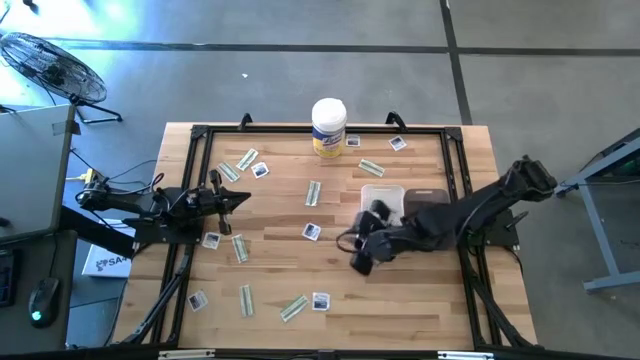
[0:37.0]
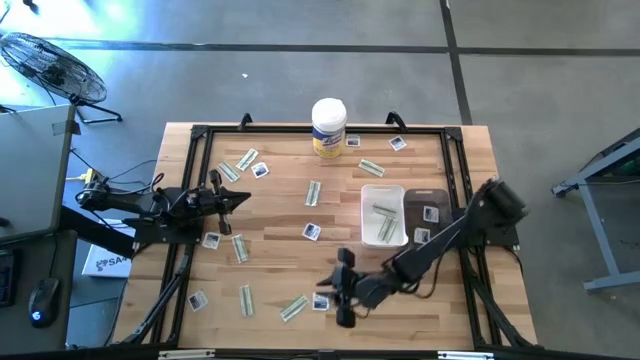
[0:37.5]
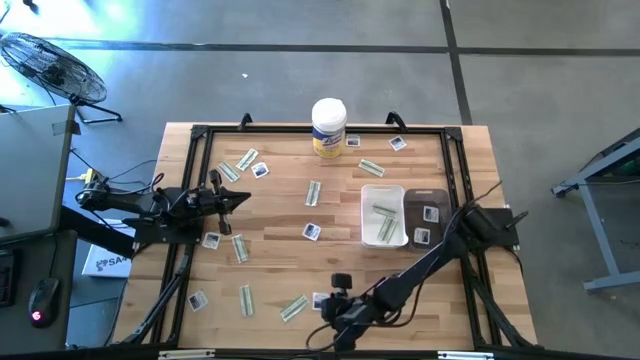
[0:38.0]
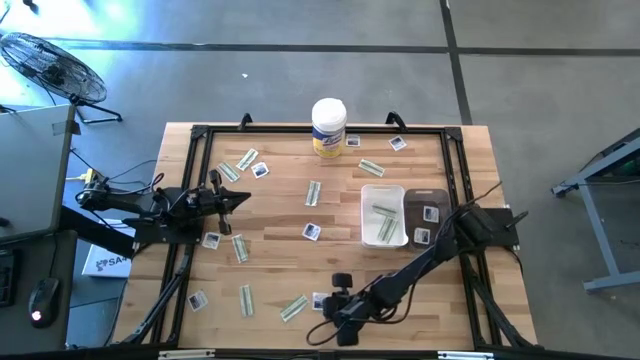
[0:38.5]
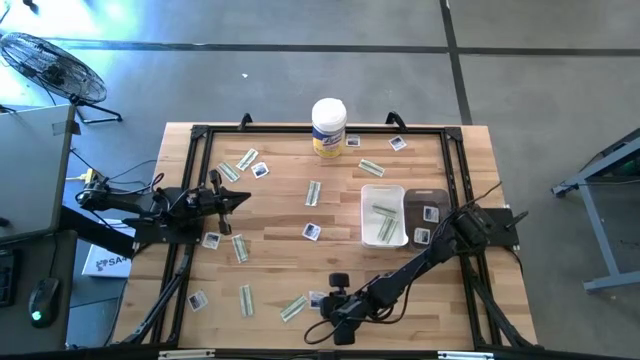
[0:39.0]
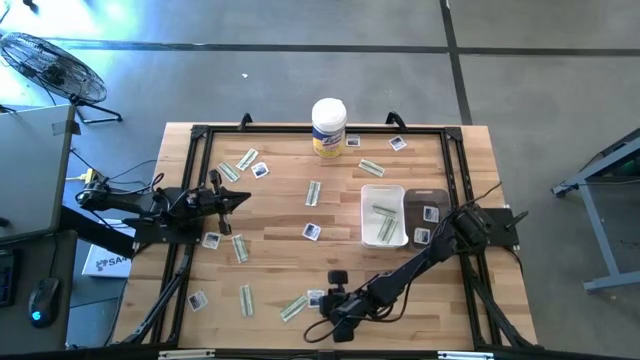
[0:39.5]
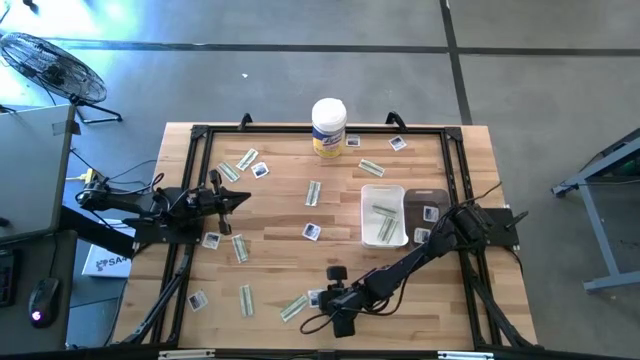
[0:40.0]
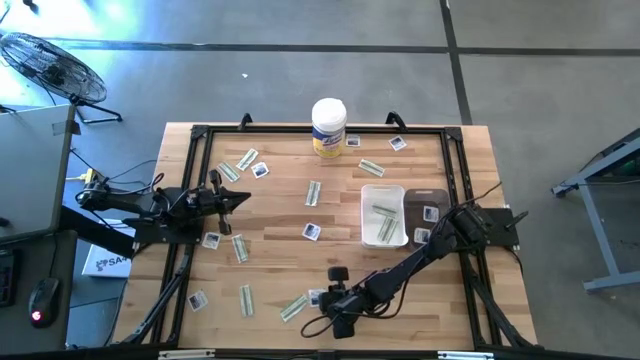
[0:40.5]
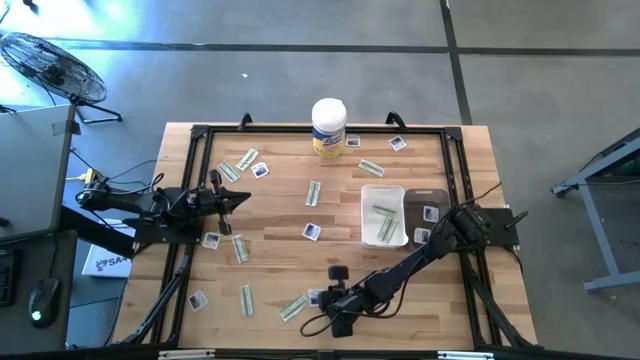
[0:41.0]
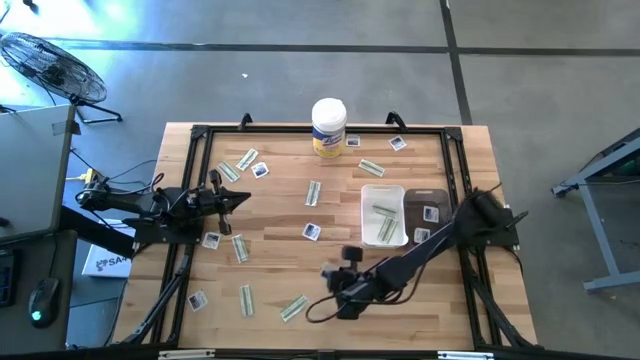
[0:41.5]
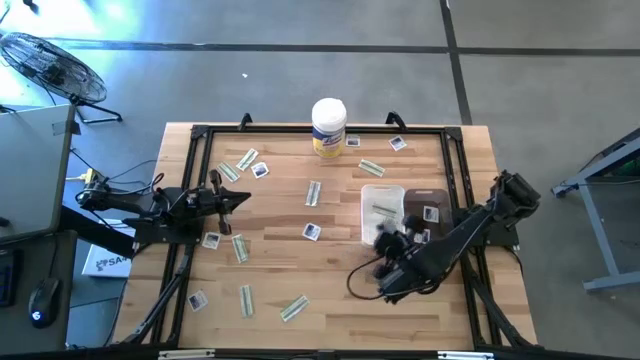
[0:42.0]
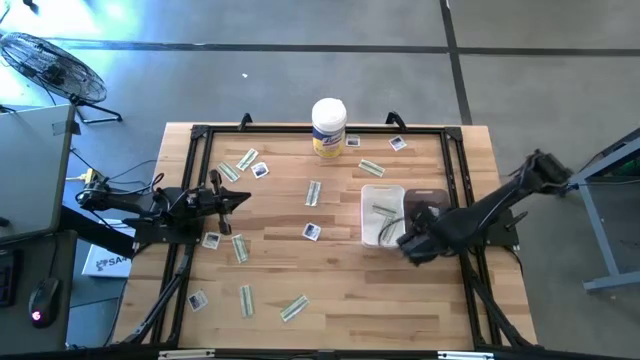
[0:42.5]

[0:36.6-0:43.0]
Task: Pick & Place First Aid Supplies
Put the blue alcohol pad into the black bin

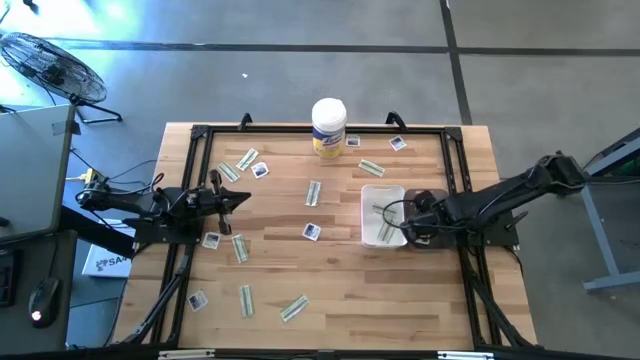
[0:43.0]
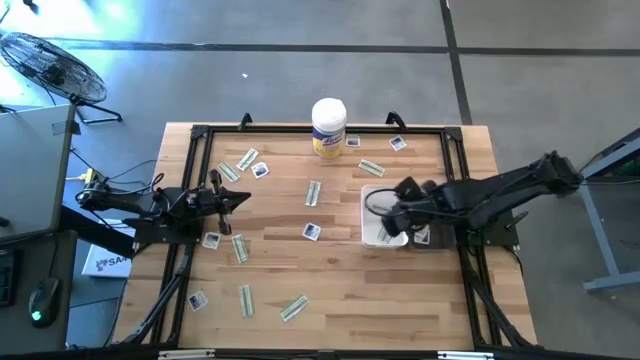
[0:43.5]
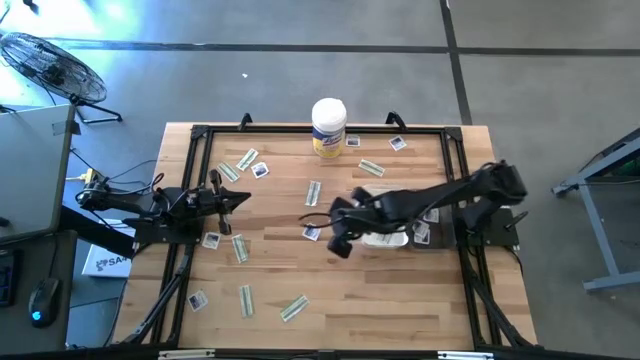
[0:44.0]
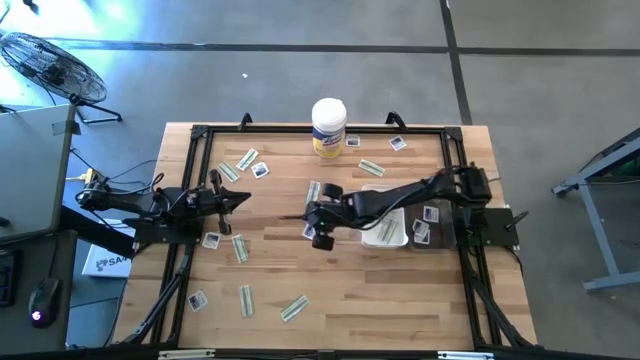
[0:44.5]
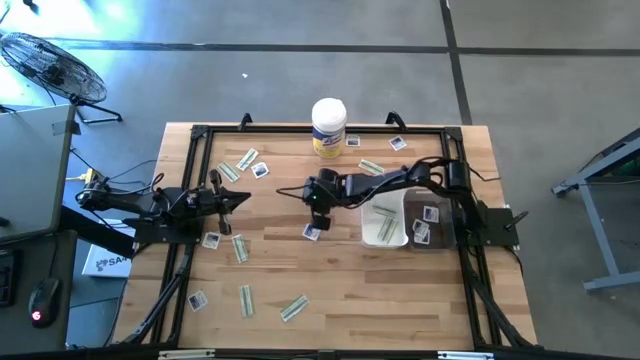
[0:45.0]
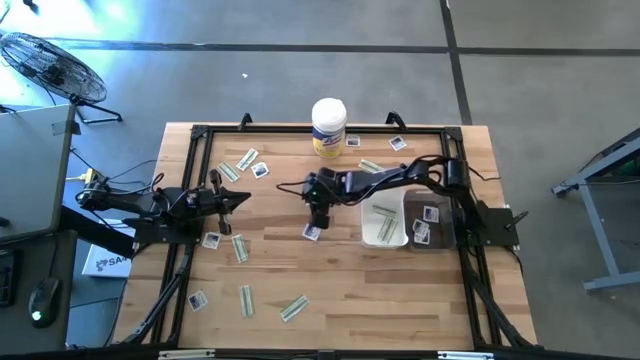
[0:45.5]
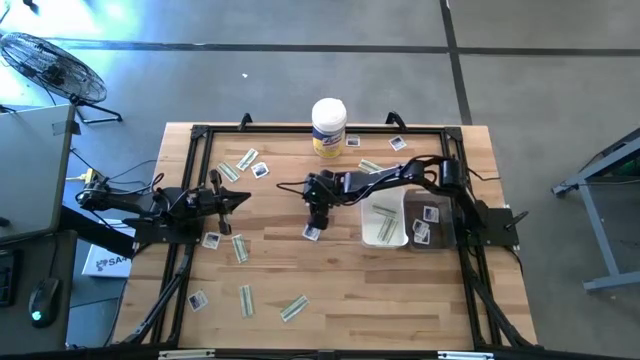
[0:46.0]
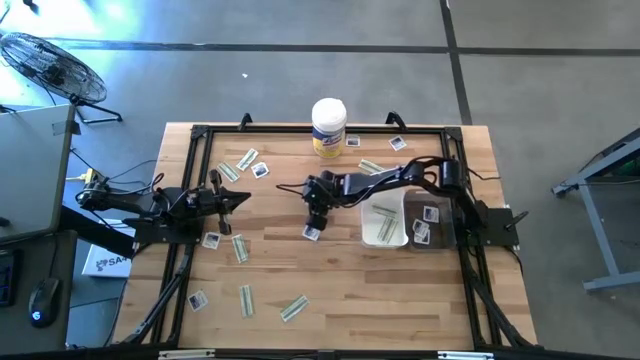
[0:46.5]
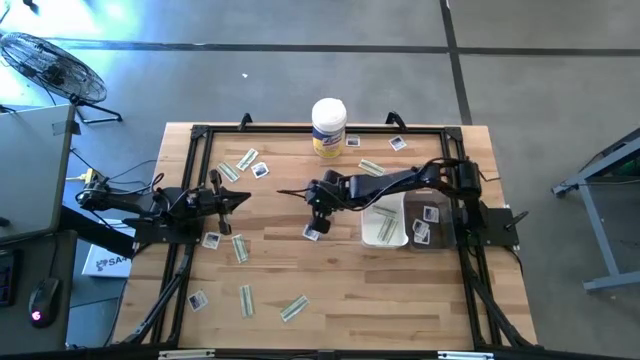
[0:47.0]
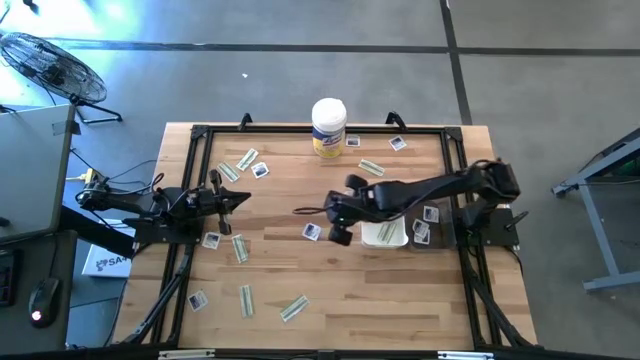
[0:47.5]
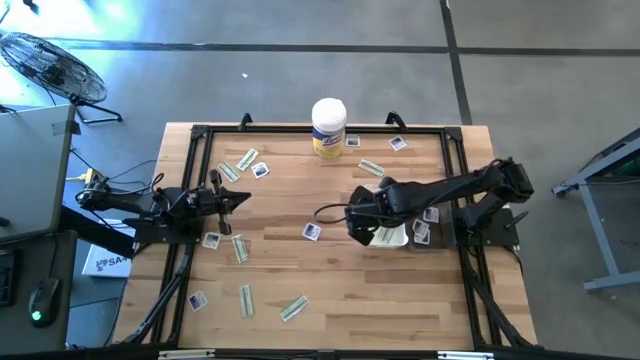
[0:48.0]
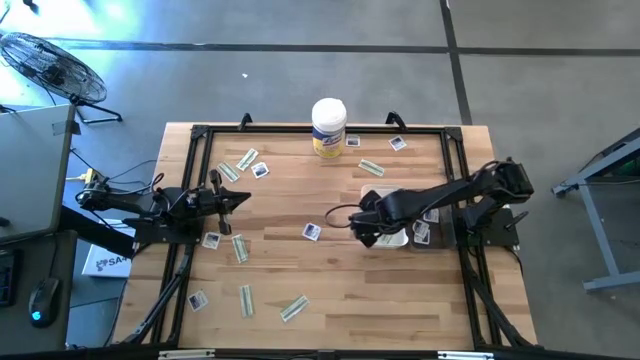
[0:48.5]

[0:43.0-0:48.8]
Put the green bandage pack into the white bin

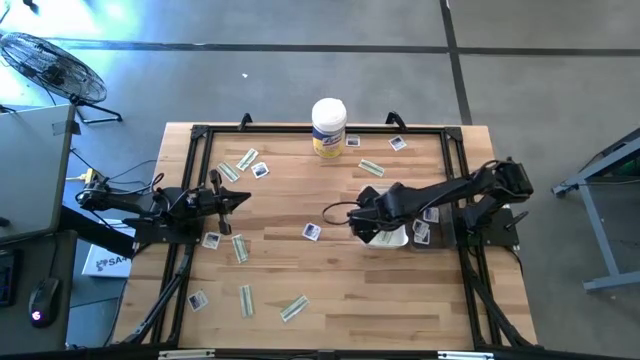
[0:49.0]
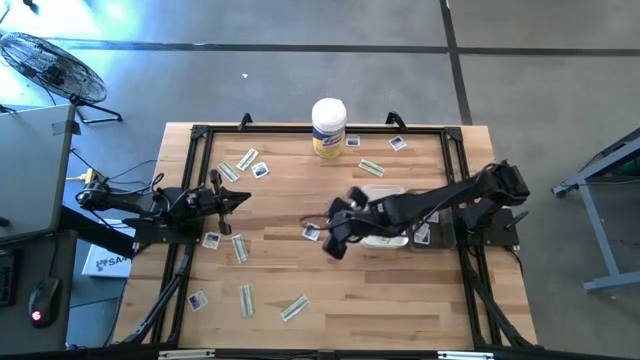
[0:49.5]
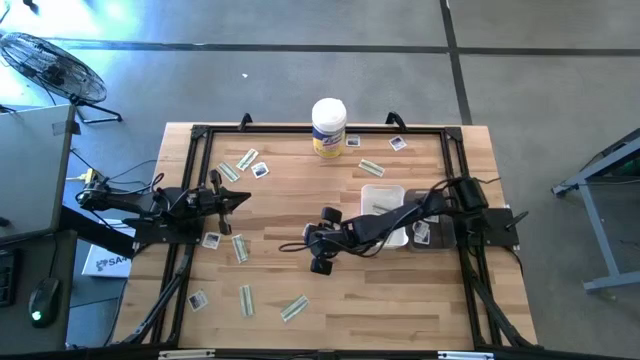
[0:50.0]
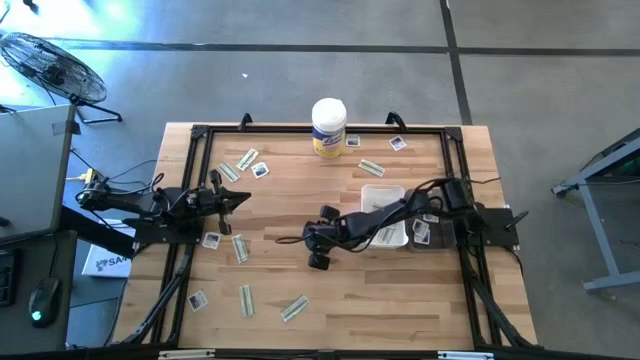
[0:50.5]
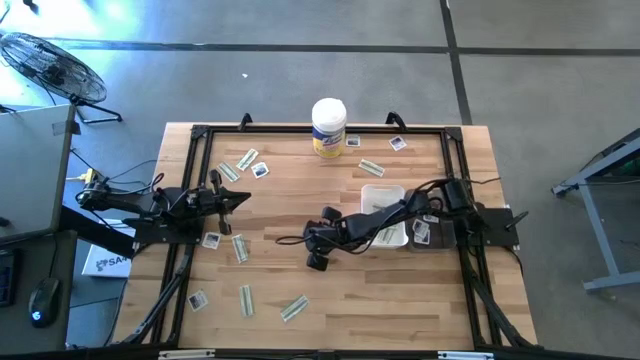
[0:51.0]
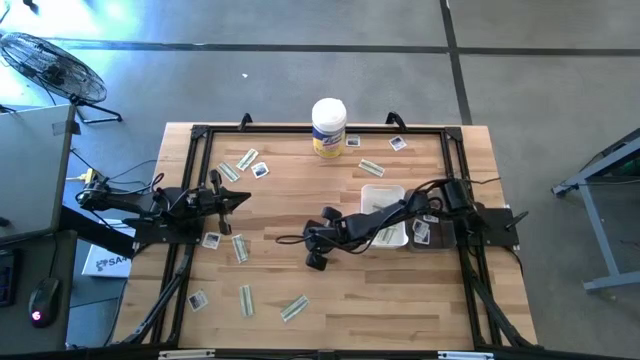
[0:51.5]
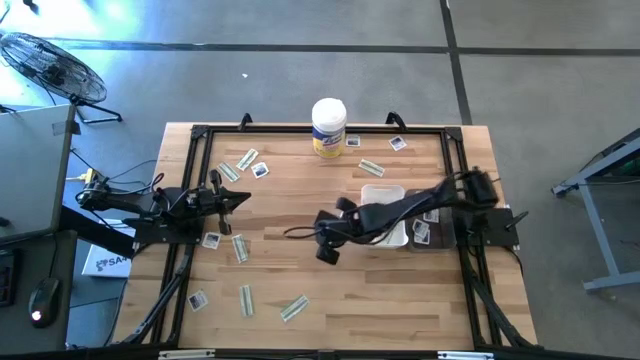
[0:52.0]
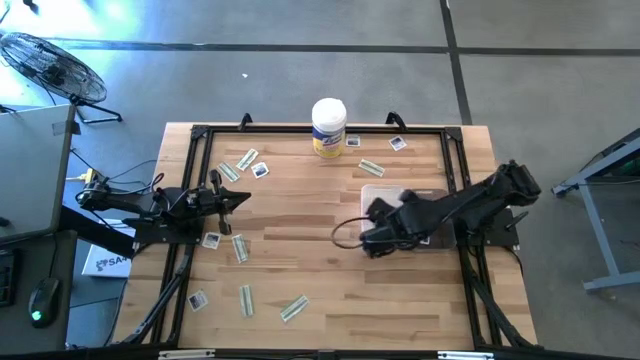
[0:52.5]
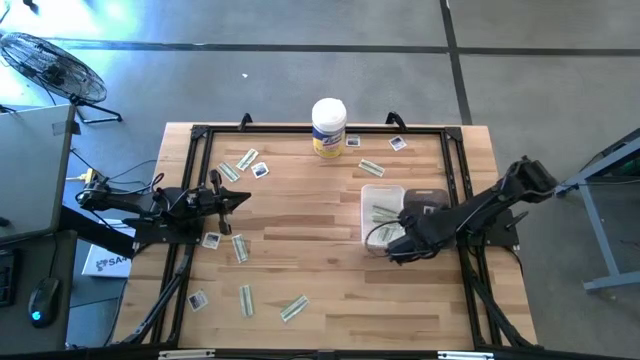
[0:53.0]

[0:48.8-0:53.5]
Put the blue alcohol pad into the black bin

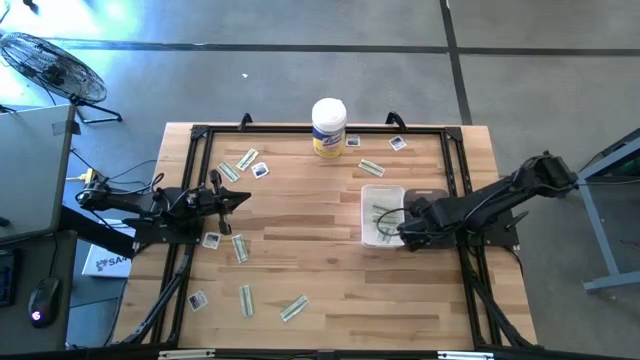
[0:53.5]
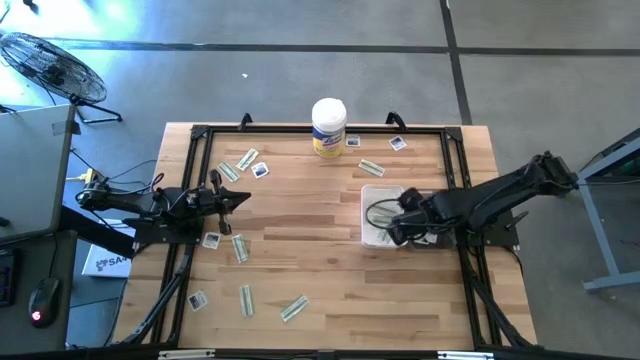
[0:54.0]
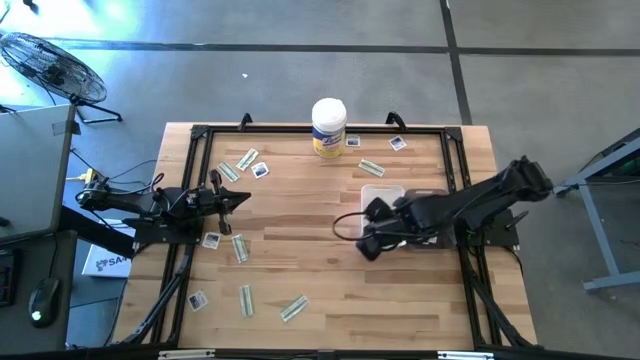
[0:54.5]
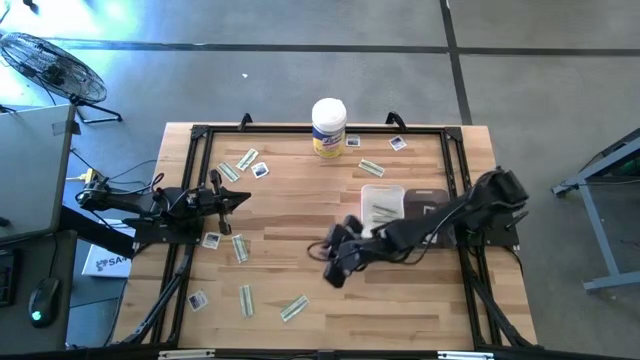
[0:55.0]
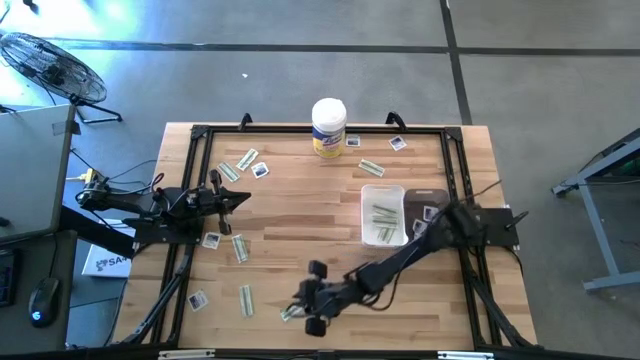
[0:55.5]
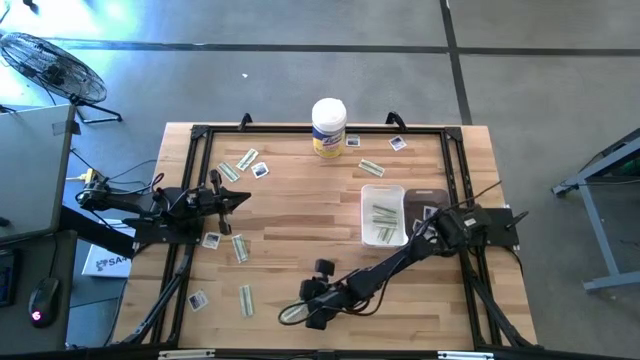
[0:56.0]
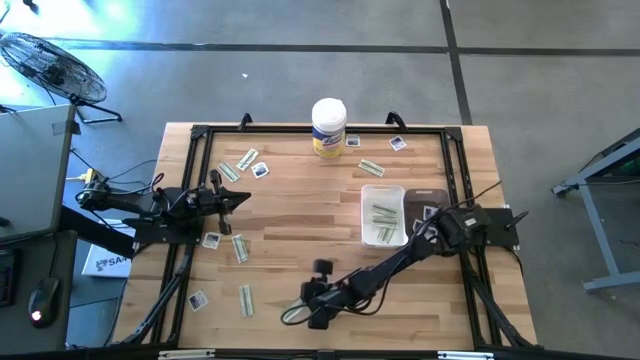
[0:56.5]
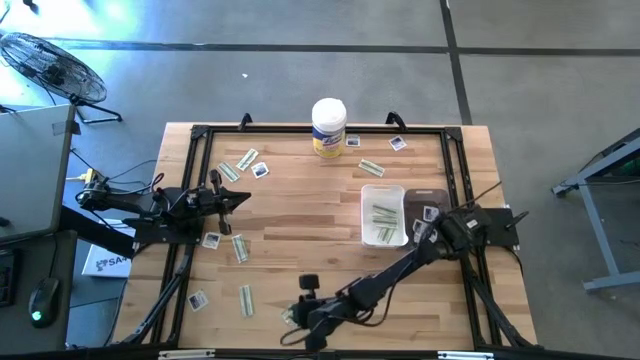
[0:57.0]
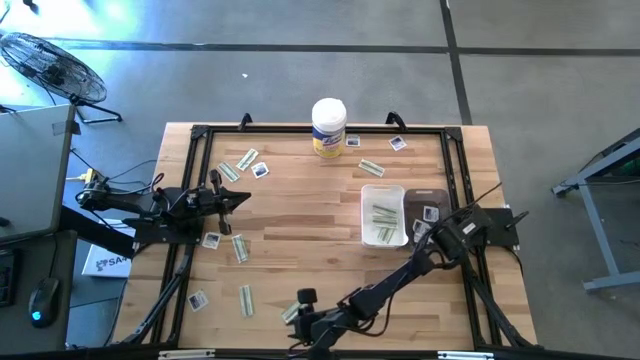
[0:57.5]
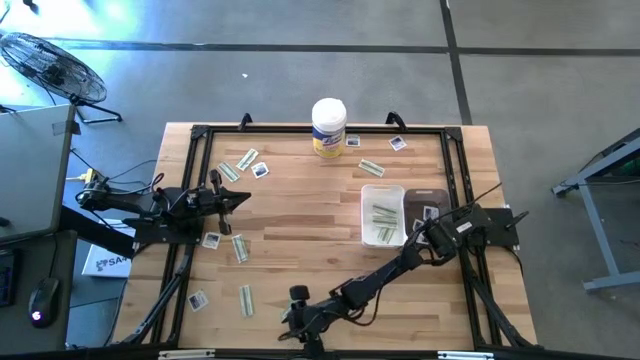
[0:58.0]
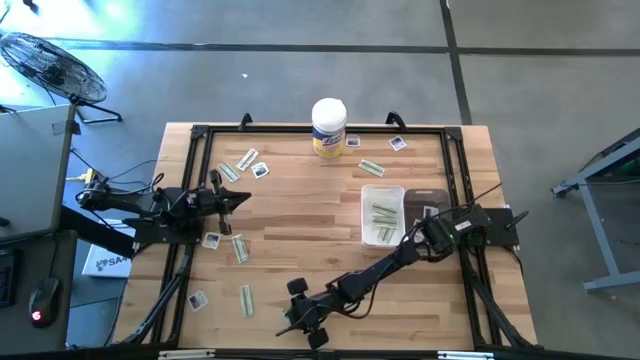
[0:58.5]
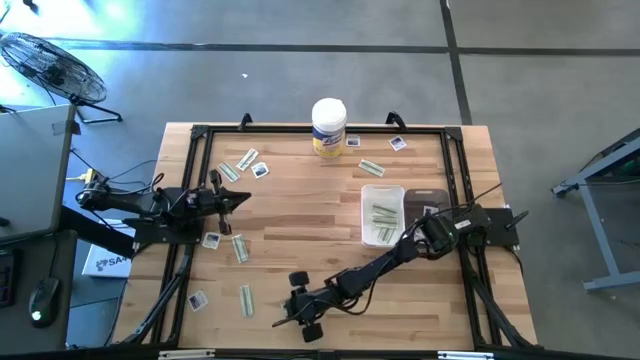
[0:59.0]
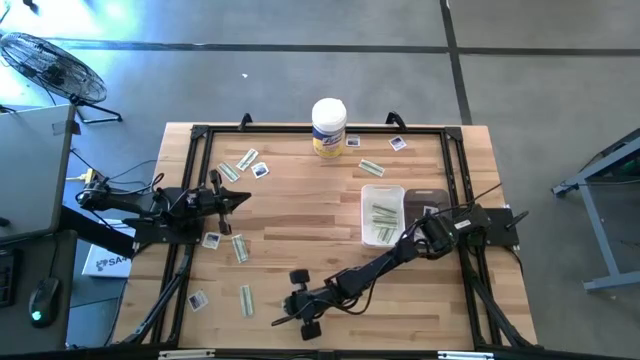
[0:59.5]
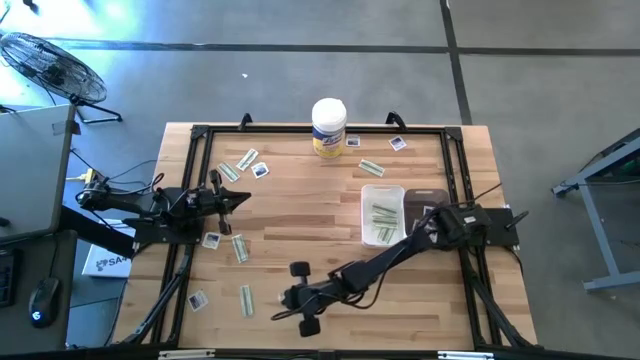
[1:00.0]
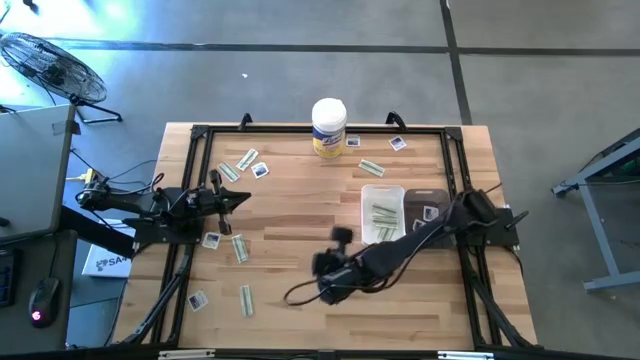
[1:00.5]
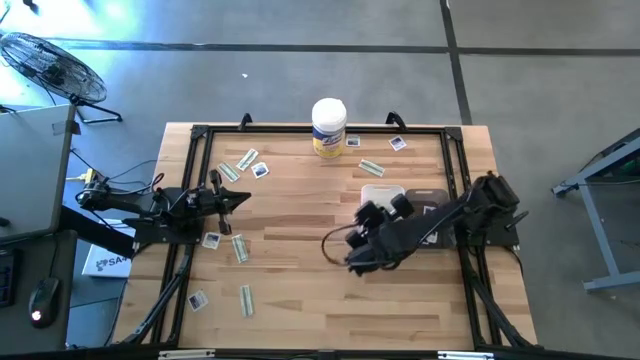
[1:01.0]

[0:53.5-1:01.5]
Put the green bandage pack into the white bin
